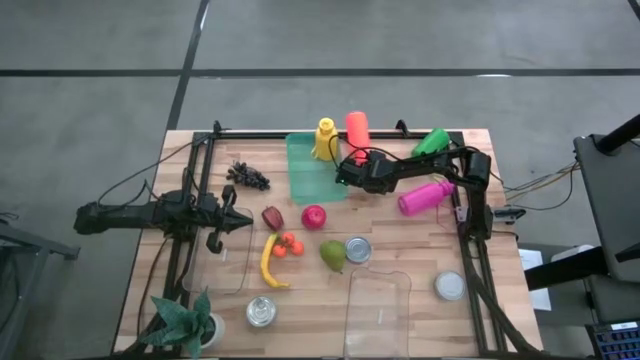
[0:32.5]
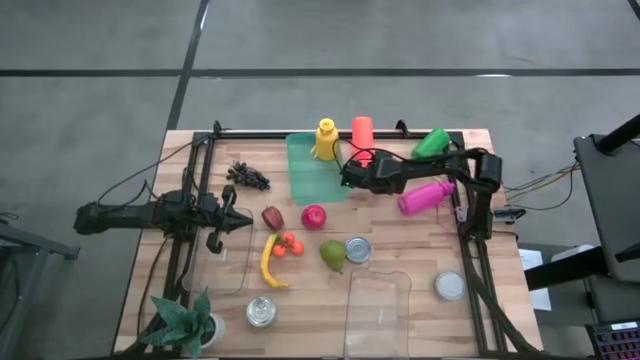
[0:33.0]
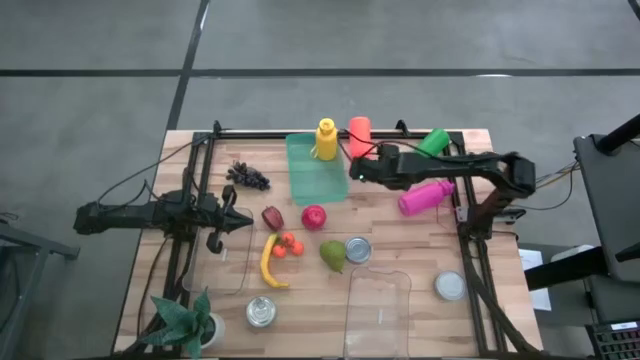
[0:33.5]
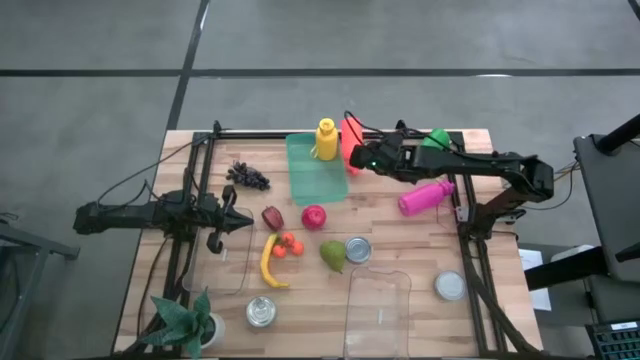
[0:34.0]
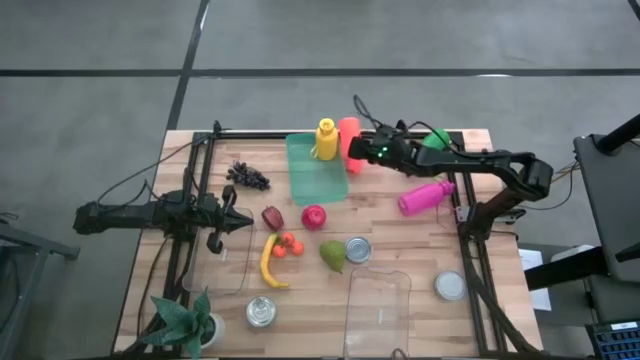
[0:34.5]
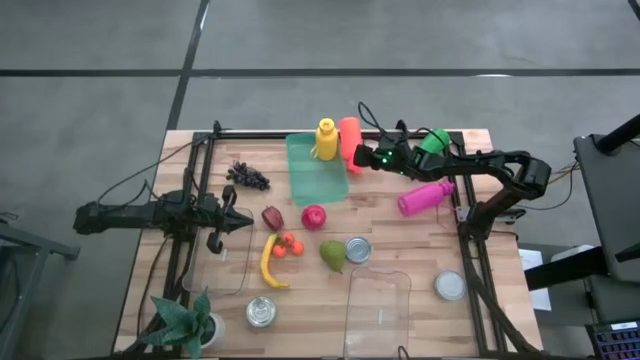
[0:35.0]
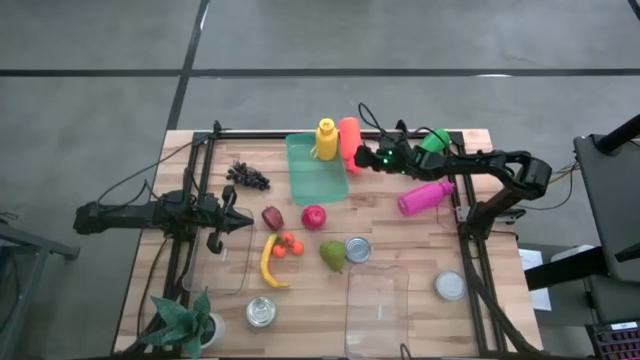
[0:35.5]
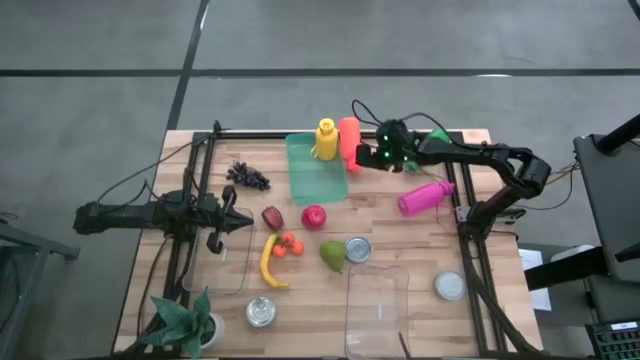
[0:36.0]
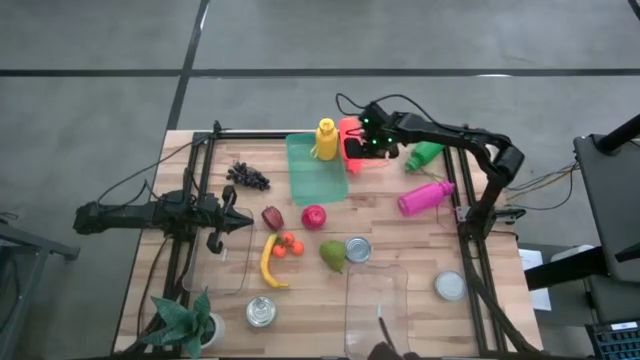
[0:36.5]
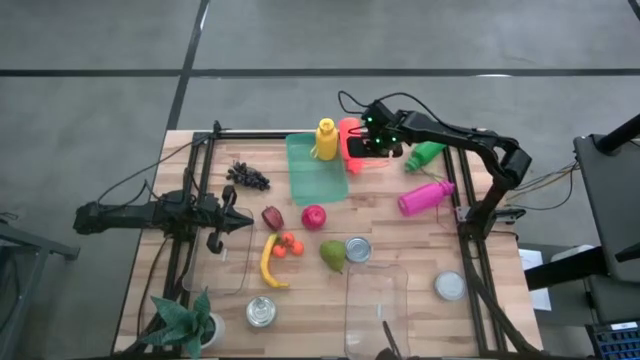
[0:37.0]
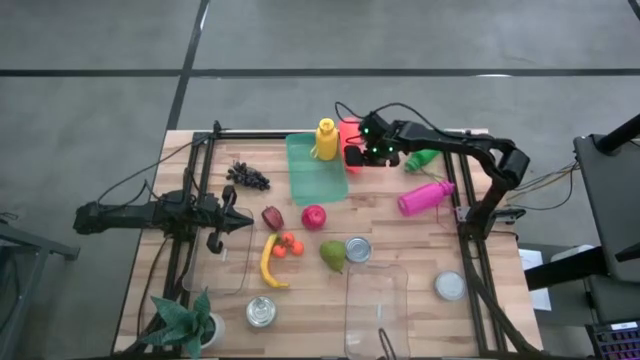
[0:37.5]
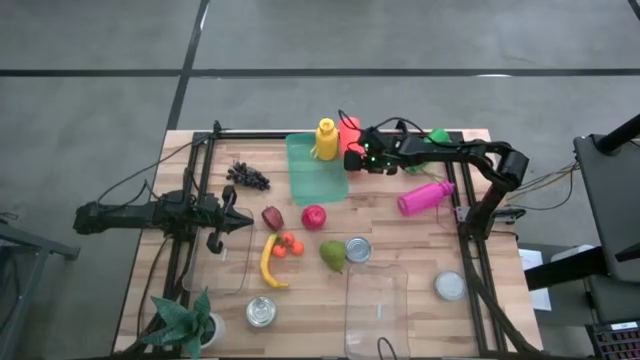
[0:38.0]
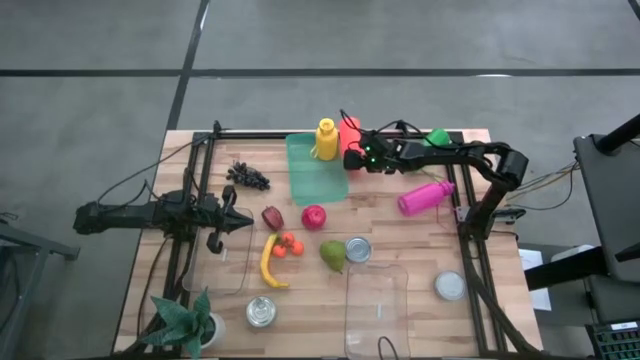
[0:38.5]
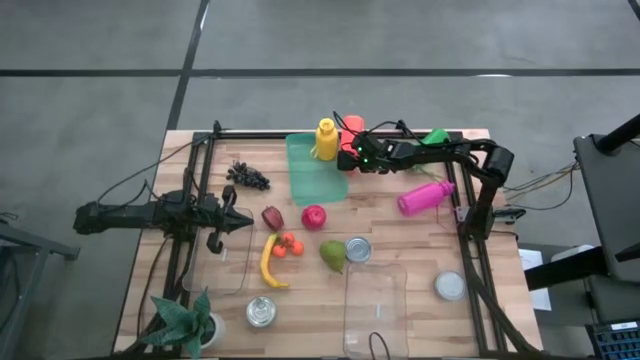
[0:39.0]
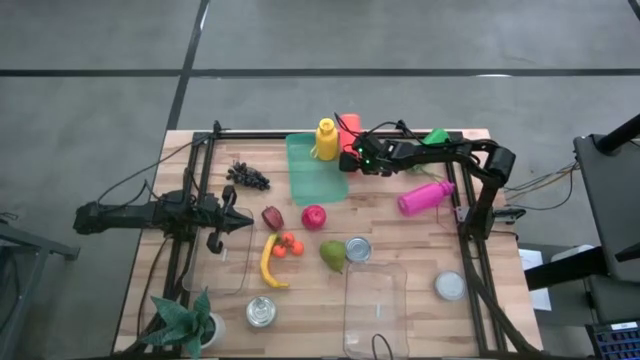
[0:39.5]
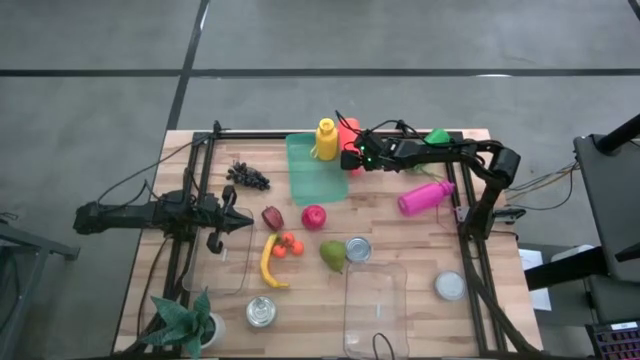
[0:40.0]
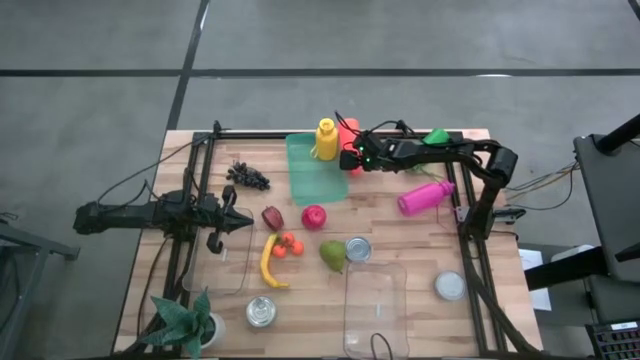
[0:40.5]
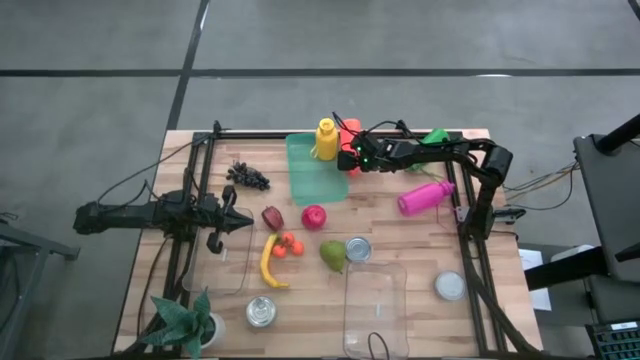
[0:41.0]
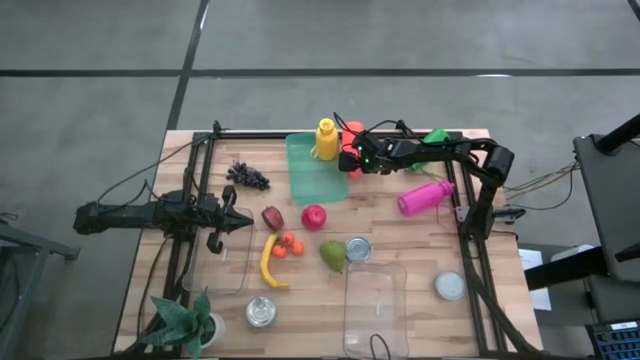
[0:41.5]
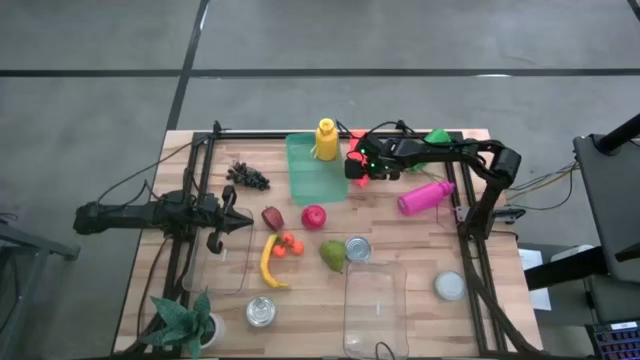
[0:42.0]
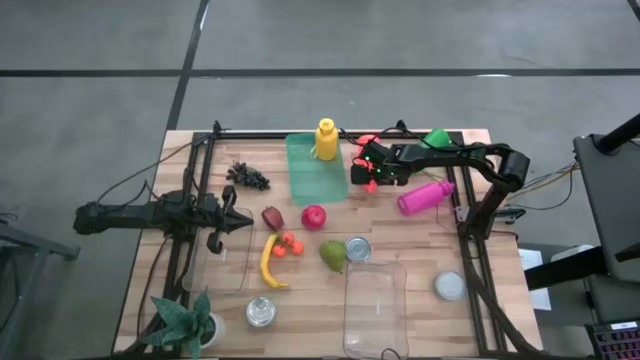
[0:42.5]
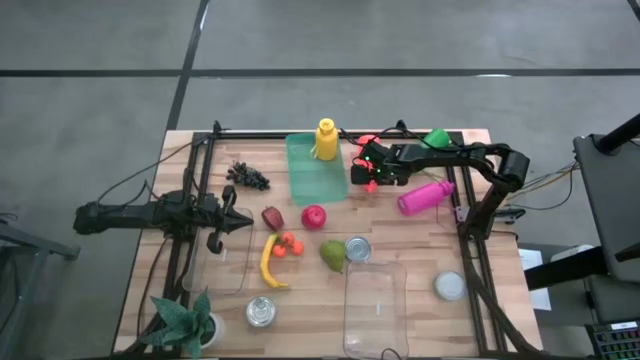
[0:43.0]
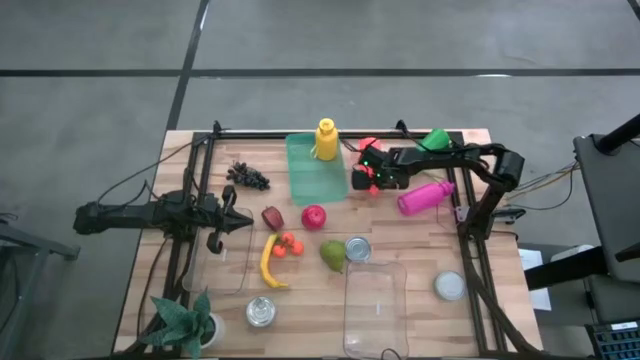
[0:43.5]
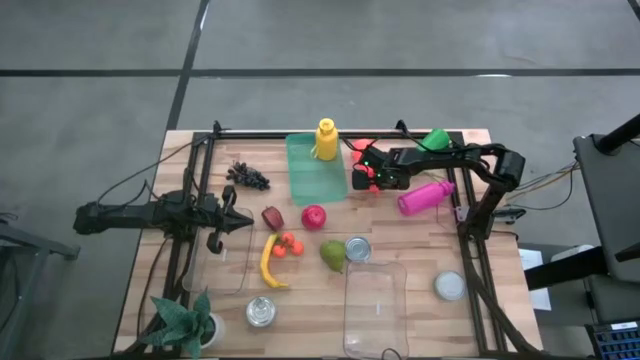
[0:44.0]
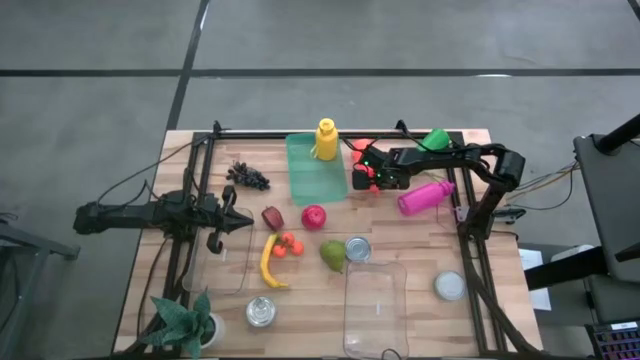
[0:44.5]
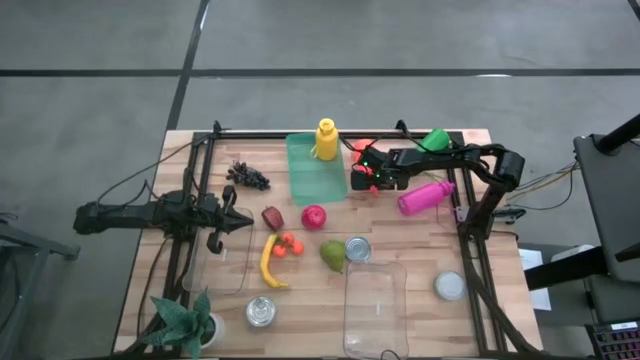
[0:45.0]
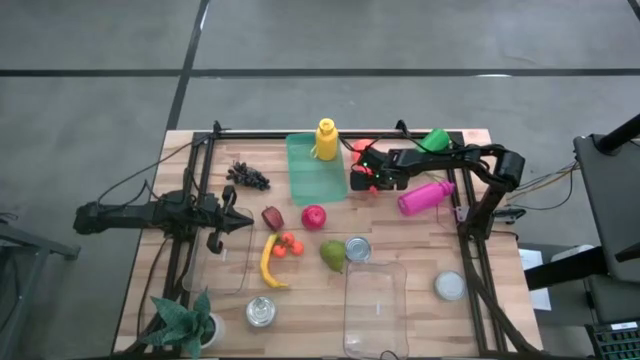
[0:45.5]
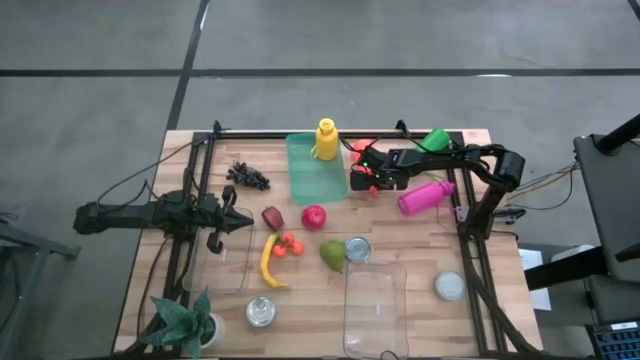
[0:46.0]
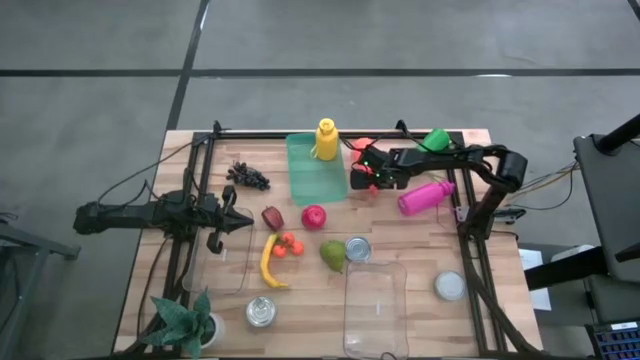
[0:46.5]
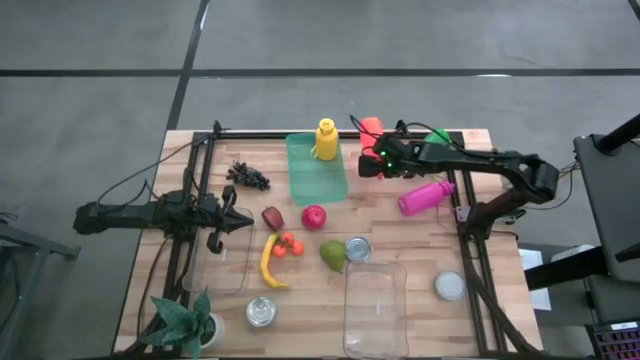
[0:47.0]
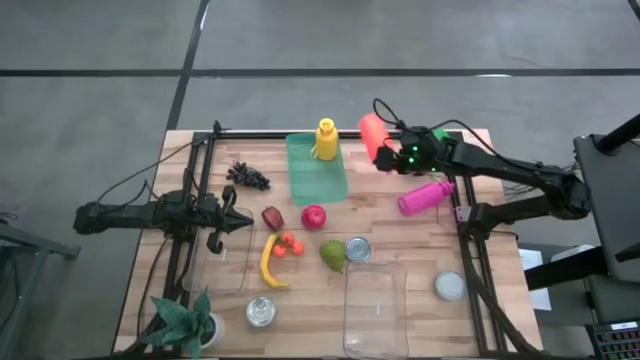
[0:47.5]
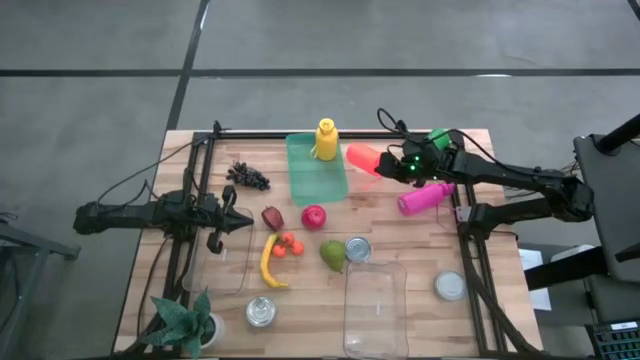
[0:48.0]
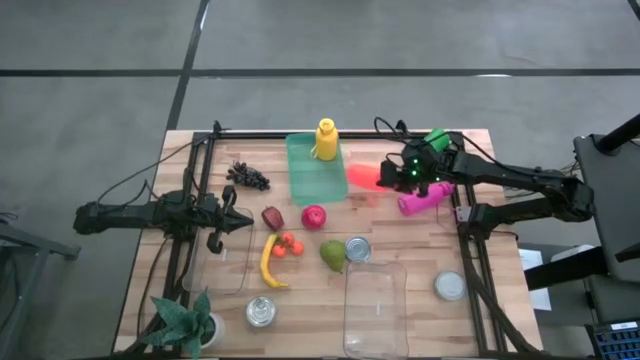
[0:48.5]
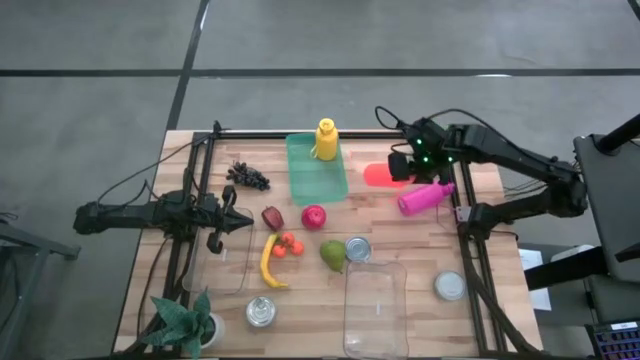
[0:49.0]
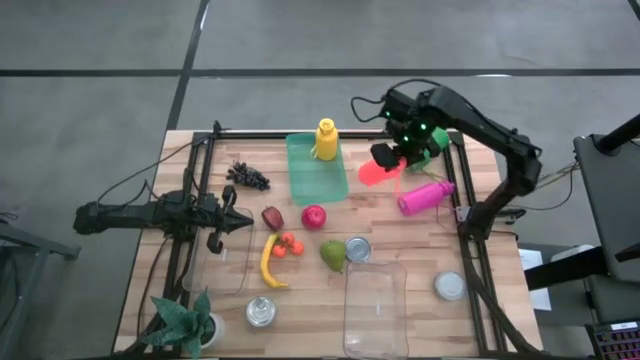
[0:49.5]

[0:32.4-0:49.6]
Task: Pick & Place Food Item
Put the orange water bottle into the green bin

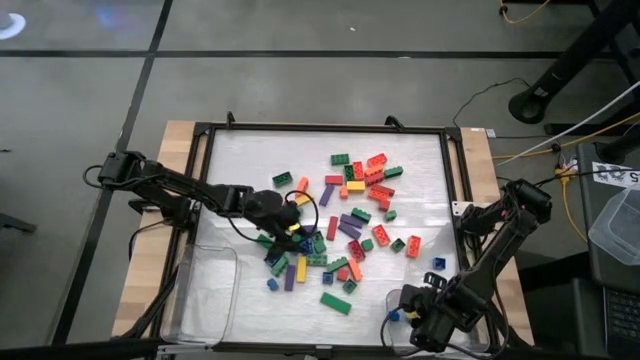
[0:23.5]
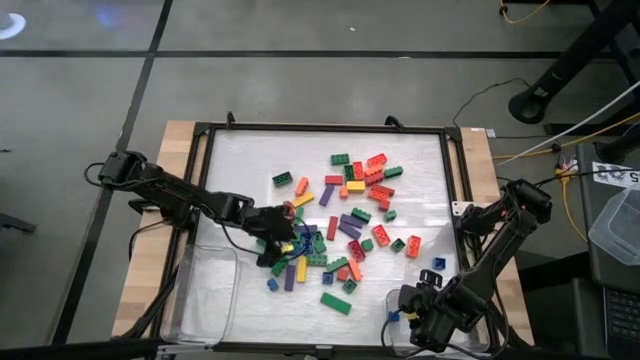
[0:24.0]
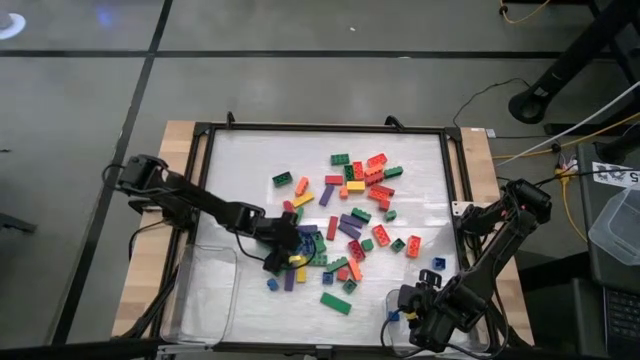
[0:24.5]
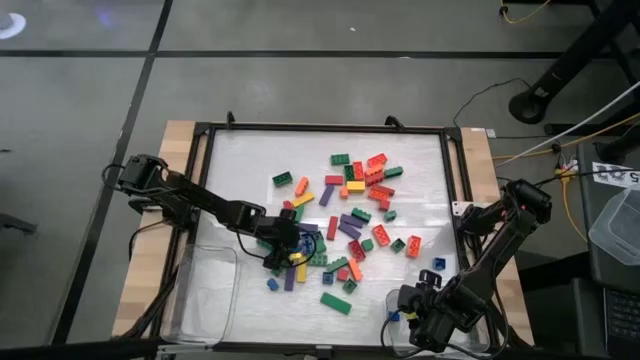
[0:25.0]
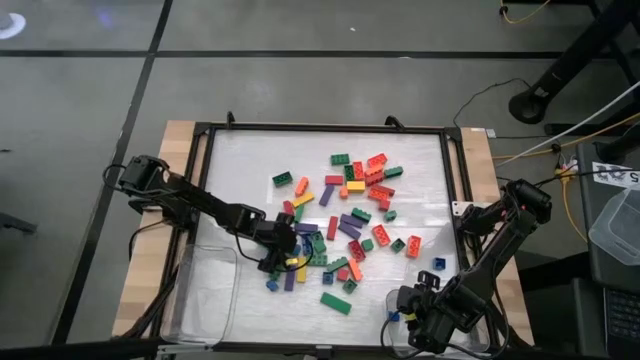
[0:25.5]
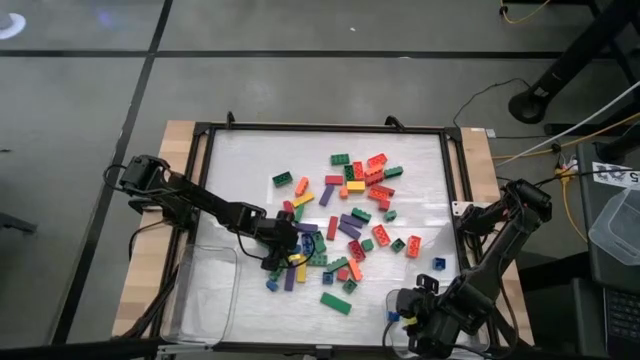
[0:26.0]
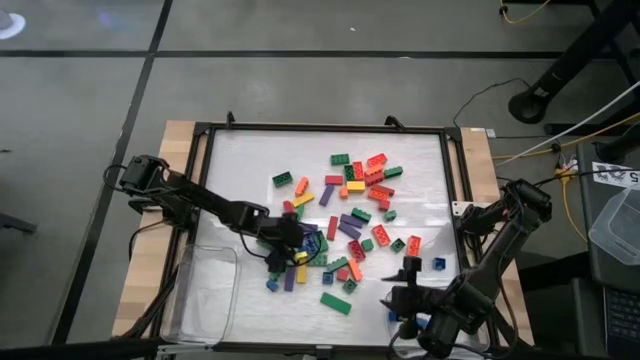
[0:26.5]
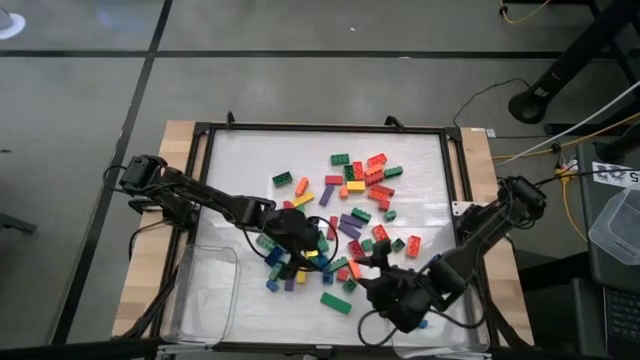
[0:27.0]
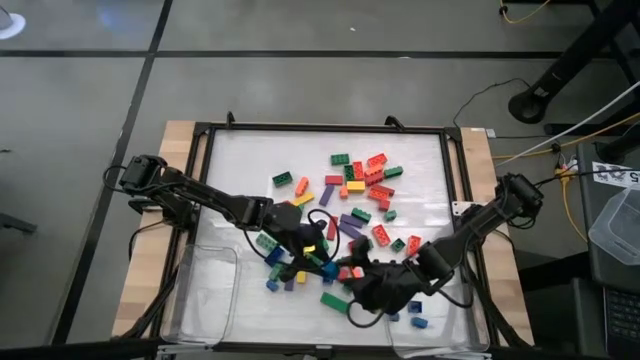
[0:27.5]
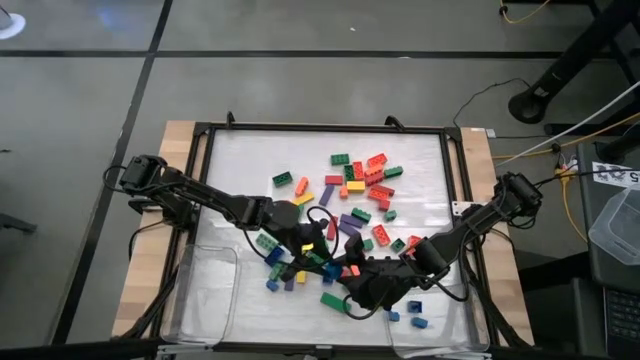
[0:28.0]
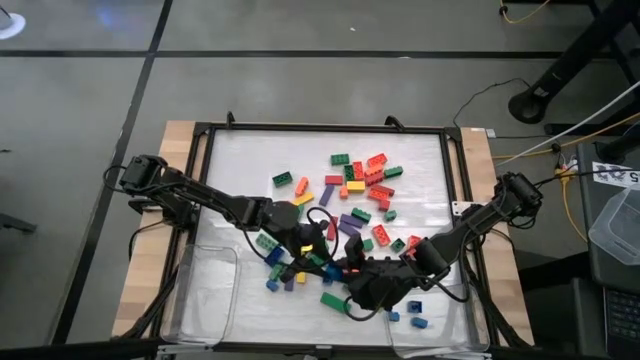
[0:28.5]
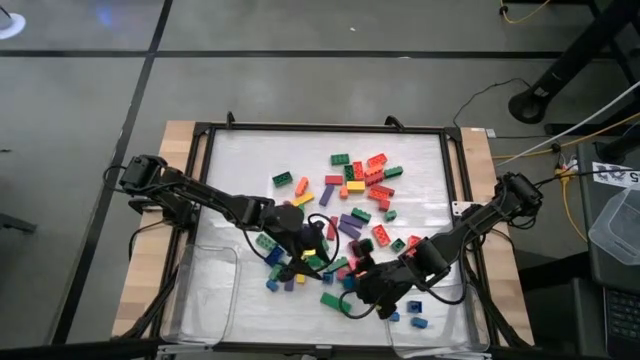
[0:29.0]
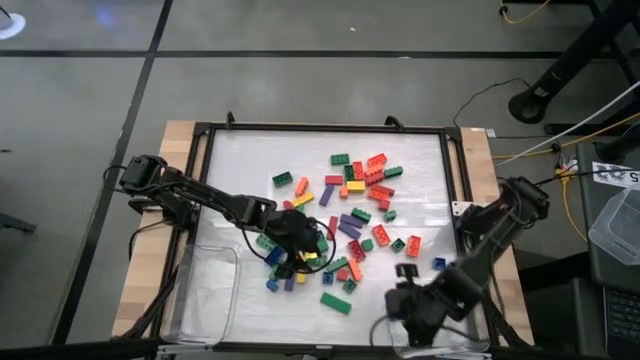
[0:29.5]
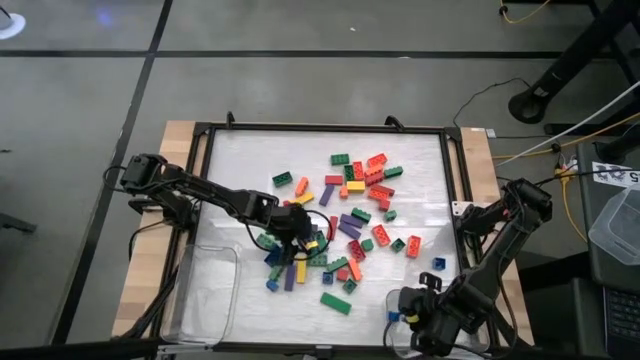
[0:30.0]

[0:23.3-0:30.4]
Task: Sort blocks by size
Put the small blue block into the right transparent bin
